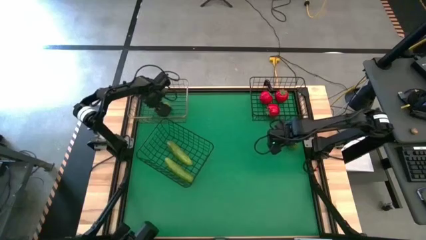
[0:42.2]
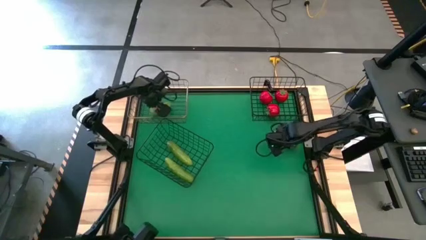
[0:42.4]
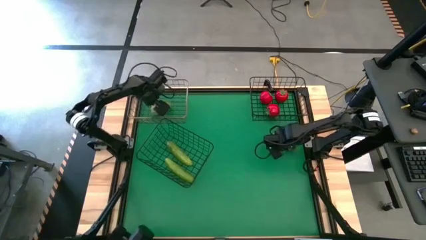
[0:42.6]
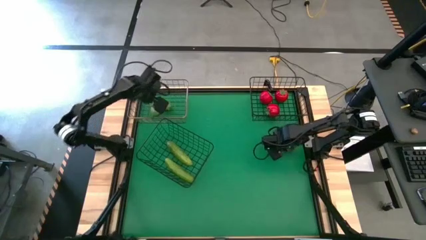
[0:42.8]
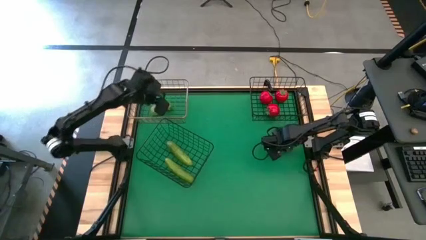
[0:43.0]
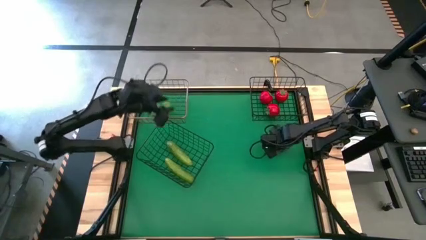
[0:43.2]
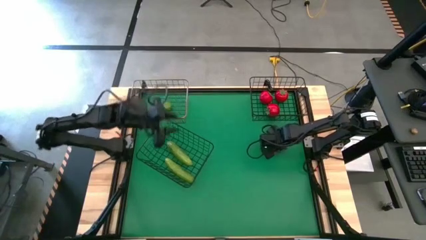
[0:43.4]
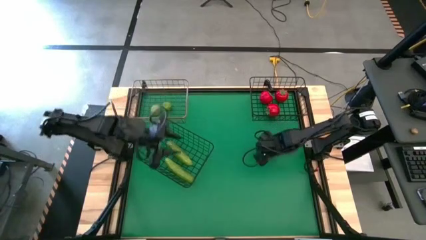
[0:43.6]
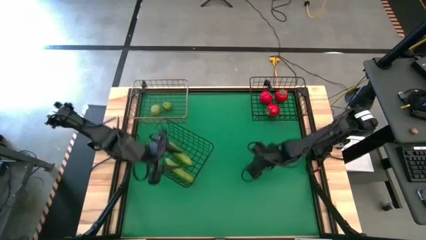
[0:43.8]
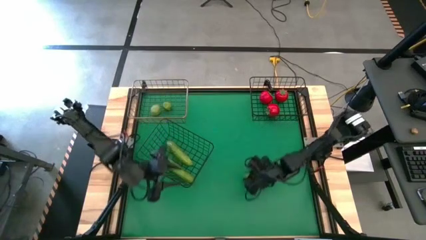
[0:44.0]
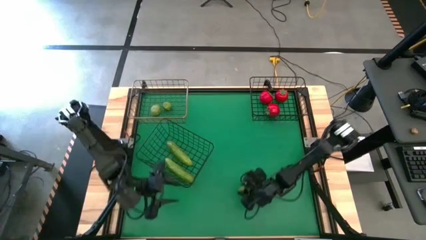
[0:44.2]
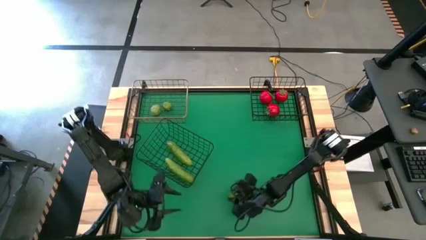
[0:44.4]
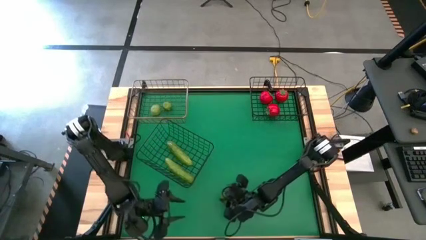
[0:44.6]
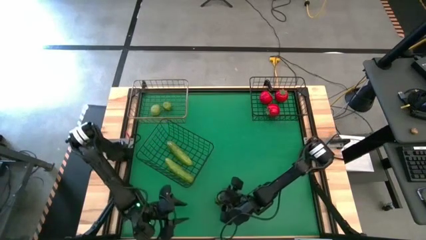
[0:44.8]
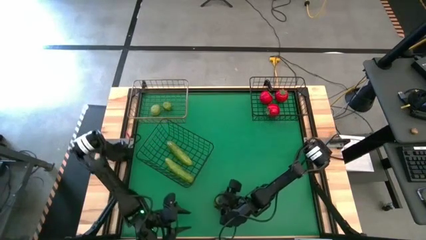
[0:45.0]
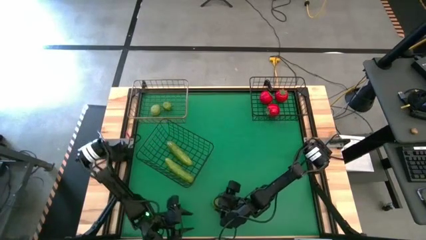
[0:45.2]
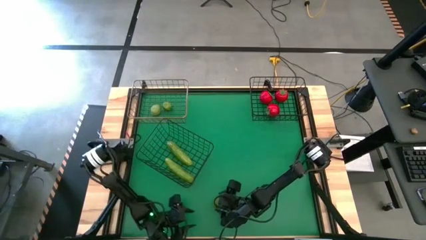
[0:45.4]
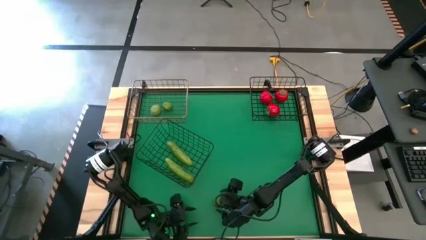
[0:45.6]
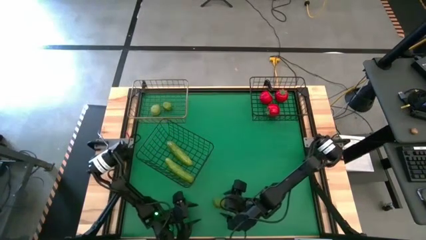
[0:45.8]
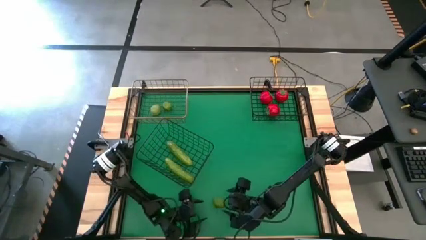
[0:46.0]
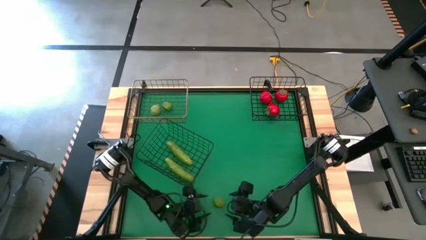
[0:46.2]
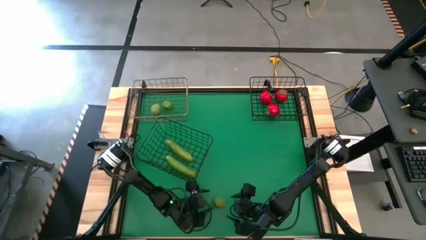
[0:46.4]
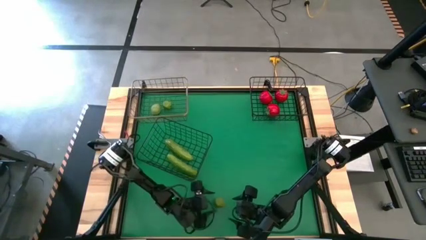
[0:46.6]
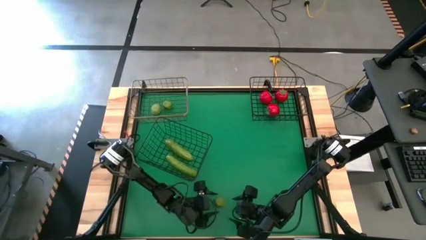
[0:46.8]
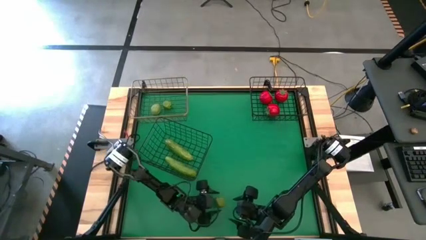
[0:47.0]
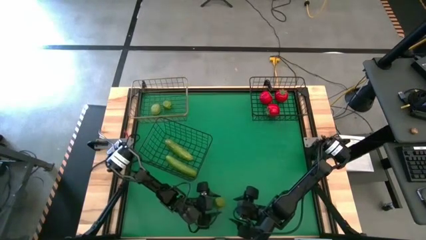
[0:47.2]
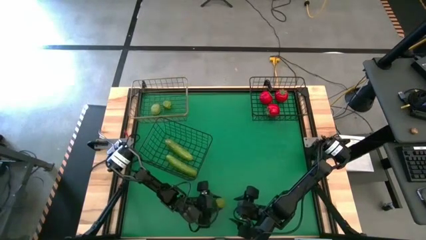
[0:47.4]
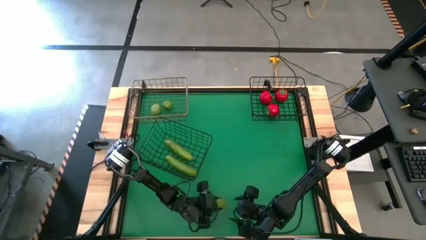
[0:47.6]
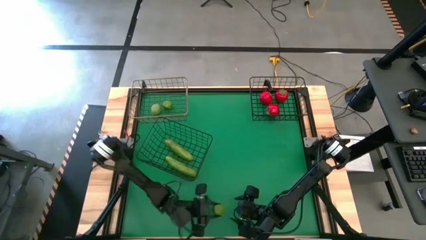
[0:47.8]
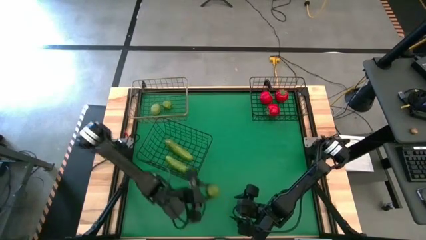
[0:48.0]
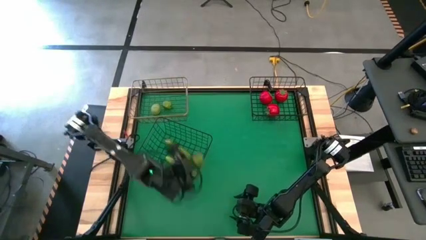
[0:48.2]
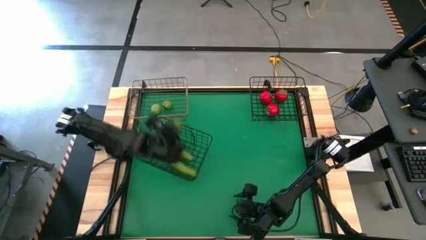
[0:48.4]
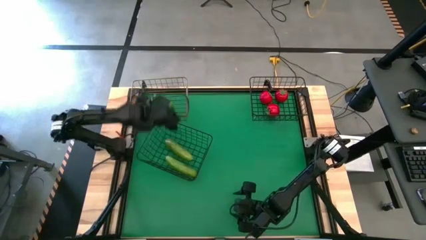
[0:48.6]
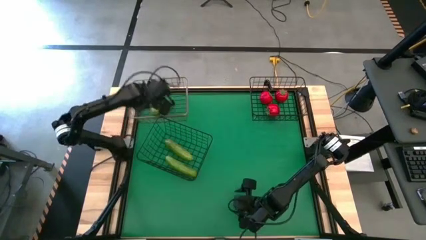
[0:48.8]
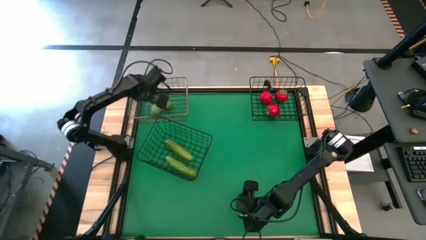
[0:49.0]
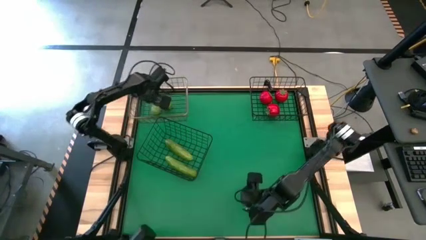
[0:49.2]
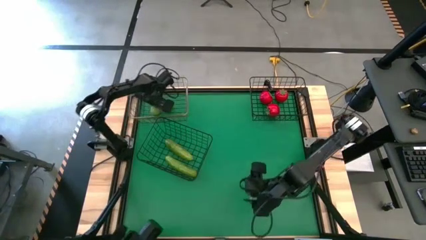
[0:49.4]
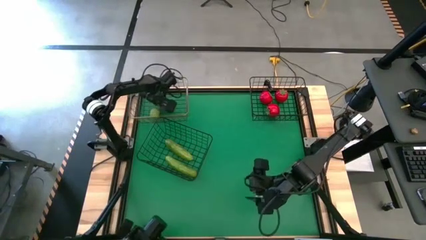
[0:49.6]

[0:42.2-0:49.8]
Task: Sort produce into baskets
Put the lime into the top left gold metal wire basket

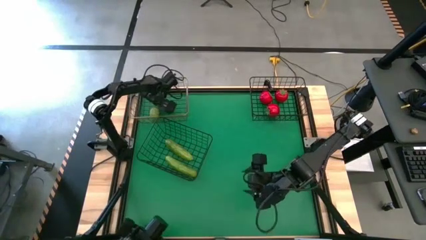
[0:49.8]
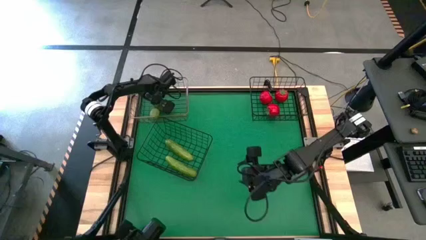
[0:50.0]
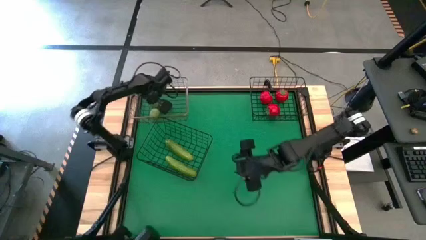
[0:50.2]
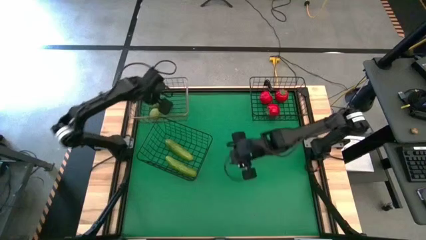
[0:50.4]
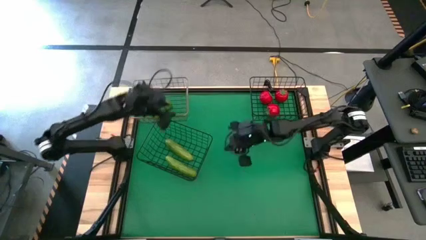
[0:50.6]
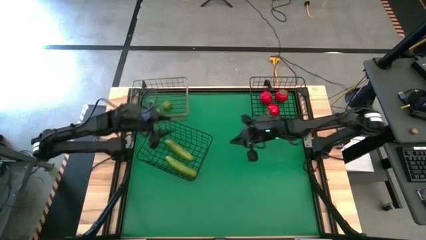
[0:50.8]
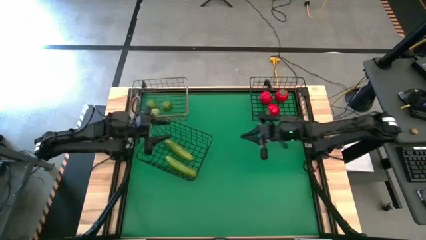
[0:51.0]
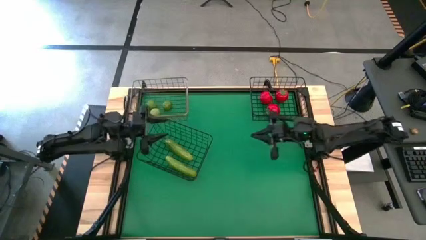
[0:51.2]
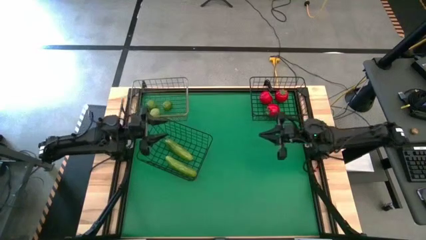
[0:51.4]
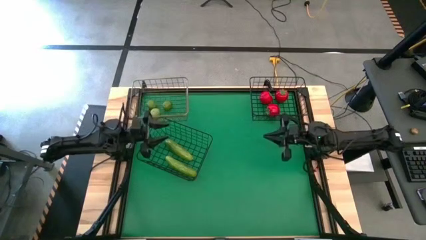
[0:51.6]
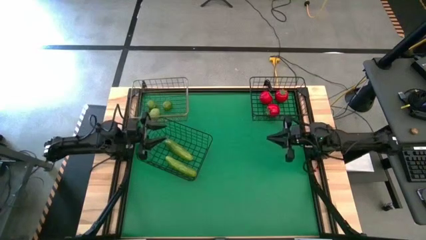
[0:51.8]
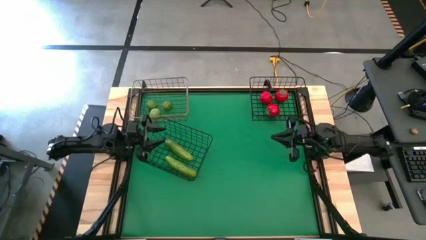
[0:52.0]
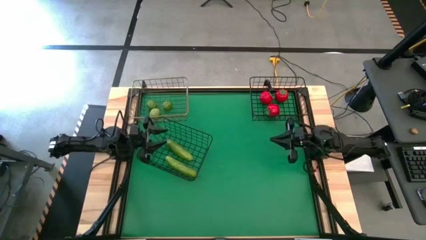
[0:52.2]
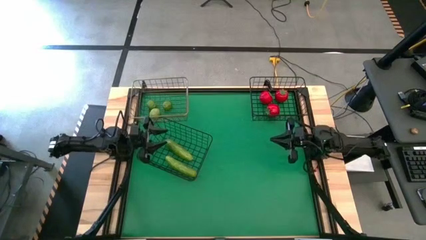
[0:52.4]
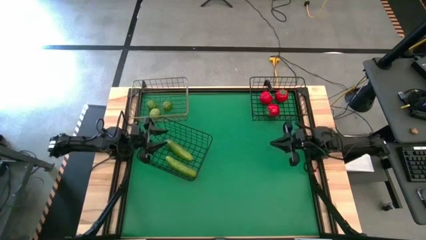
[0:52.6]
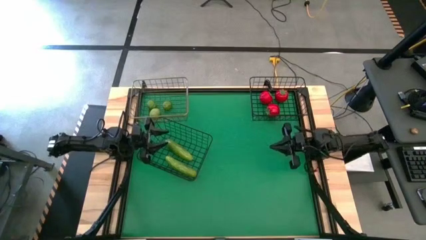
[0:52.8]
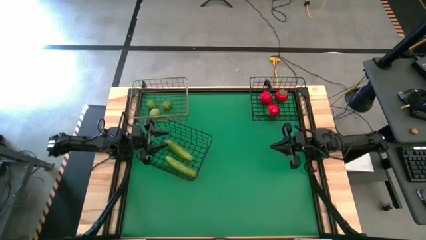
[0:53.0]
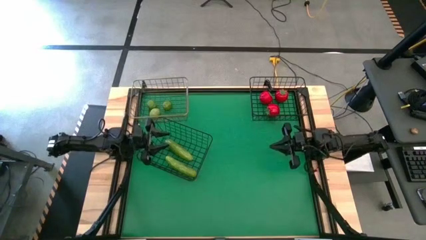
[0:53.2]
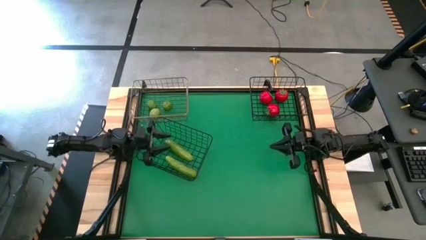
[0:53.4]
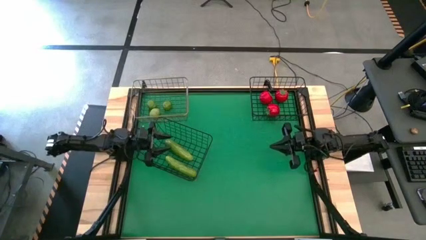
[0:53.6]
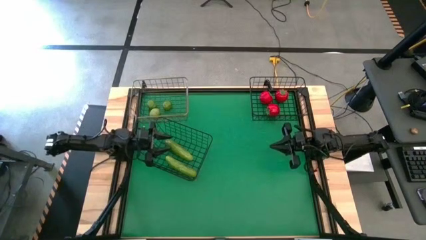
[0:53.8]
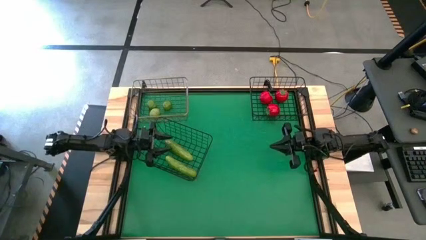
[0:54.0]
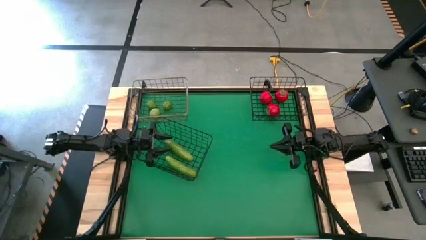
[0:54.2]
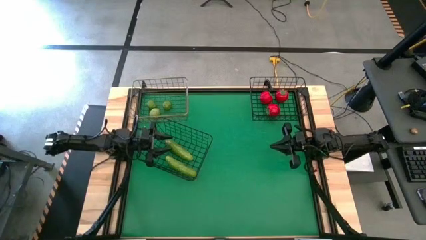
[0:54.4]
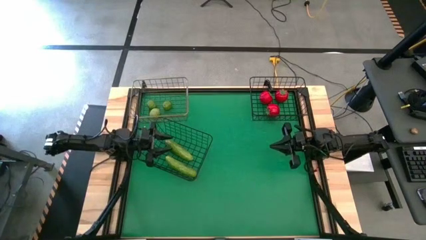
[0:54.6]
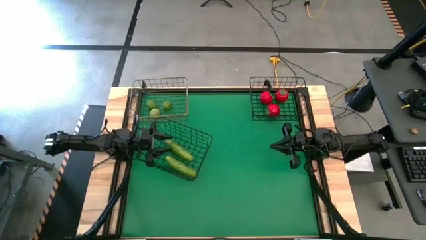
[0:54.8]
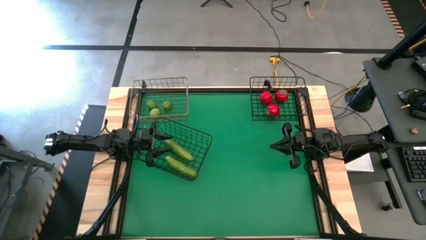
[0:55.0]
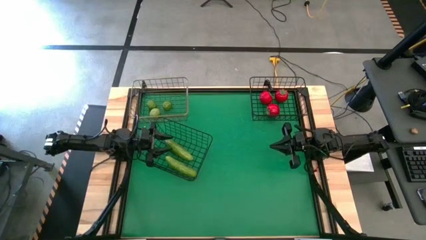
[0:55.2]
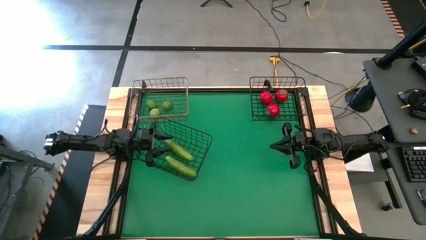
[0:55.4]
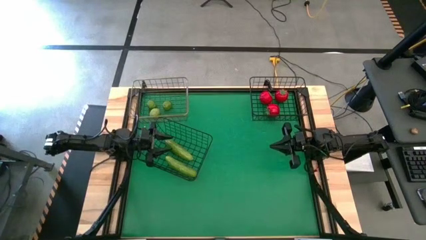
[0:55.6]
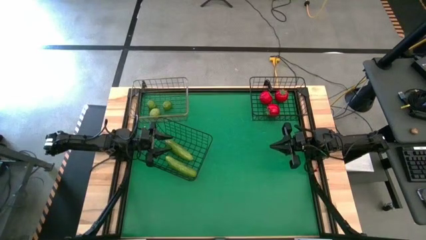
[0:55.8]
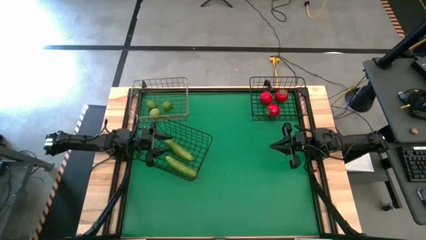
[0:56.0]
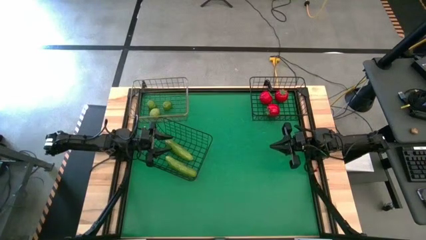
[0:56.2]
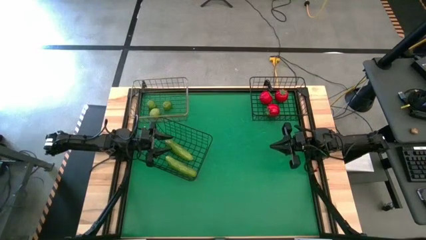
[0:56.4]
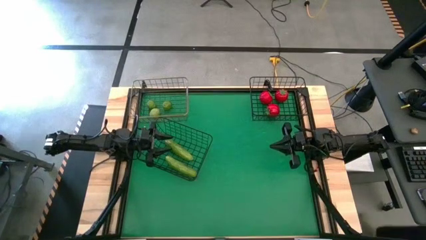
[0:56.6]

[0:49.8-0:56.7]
Return to Home Position

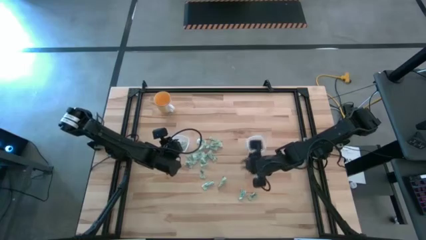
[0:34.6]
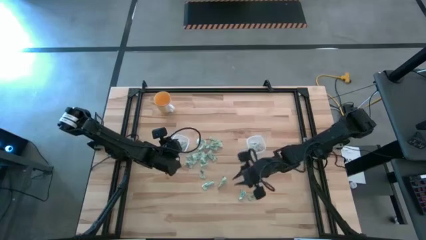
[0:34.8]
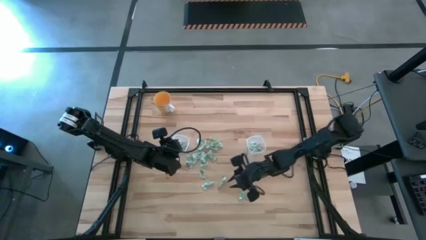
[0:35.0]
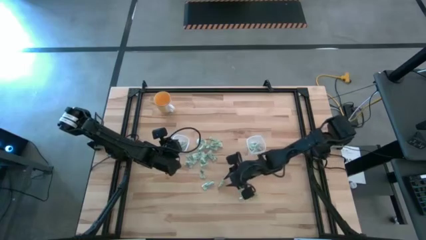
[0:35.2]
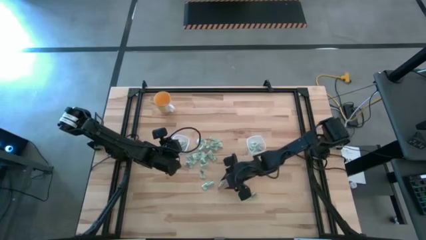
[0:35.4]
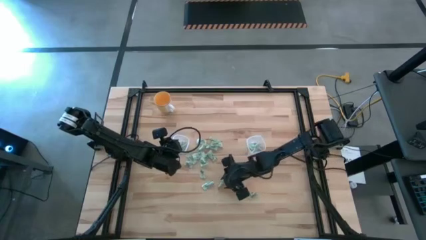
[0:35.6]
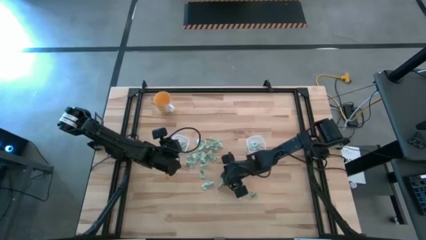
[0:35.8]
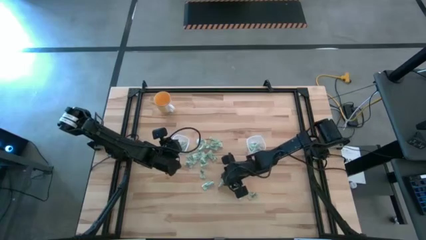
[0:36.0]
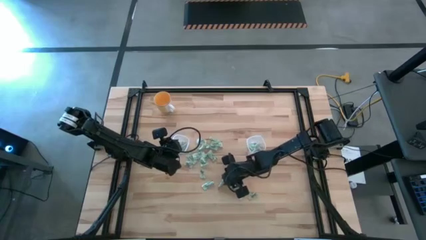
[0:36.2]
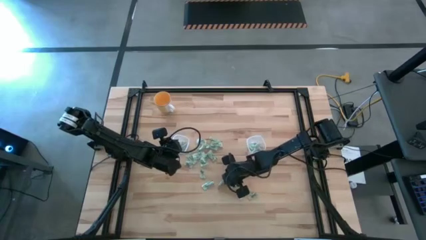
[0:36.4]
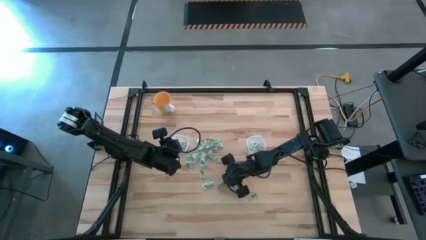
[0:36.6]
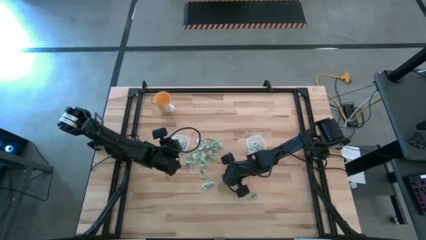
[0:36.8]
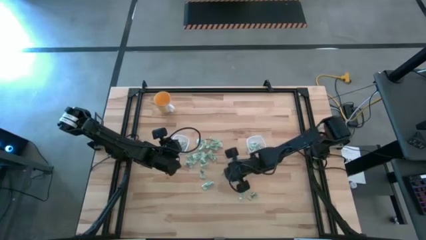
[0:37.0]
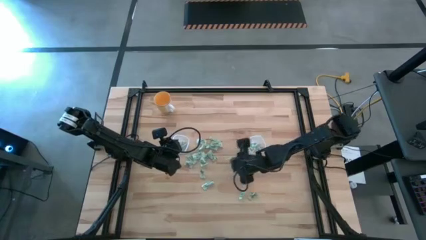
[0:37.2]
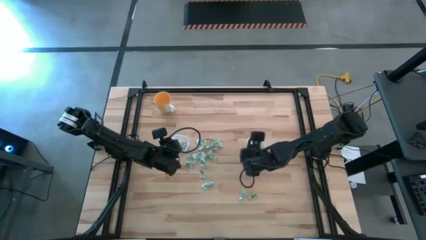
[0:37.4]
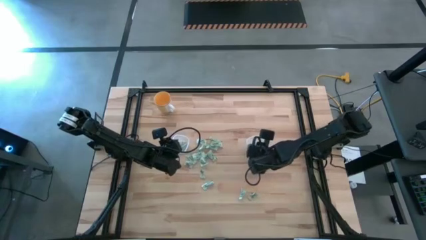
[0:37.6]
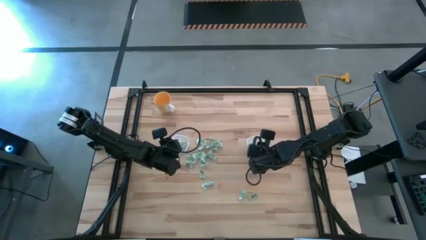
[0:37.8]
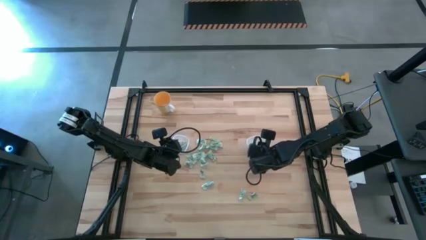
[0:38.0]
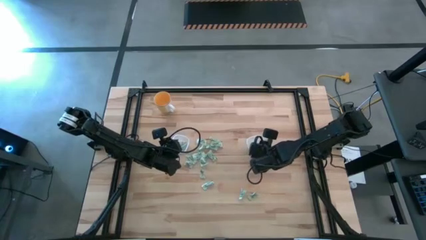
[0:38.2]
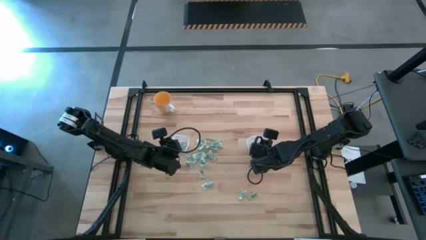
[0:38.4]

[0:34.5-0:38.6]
Task: Pick and place Stevia / Truvia into bins
Put the stevia packet into the right transparent container
